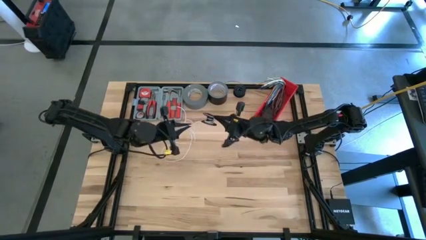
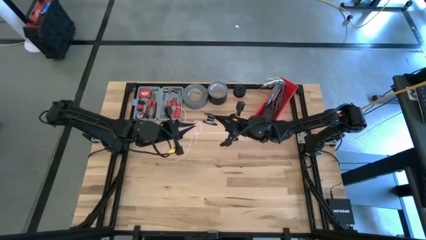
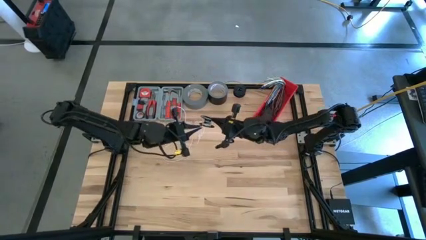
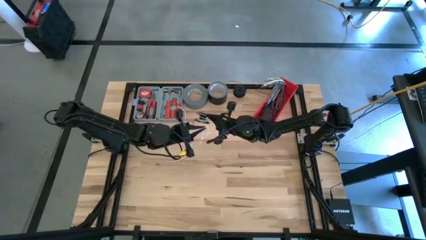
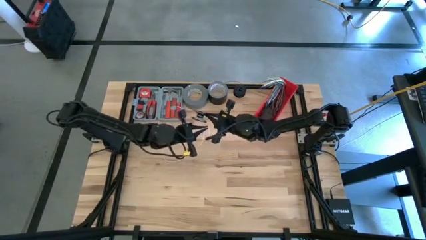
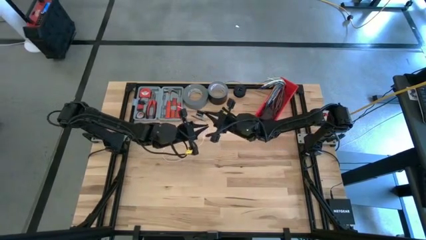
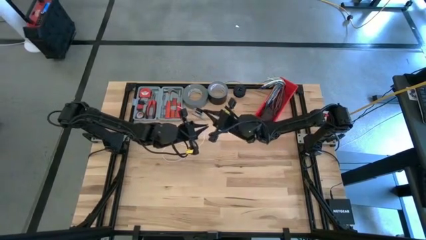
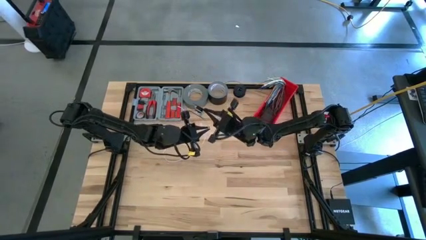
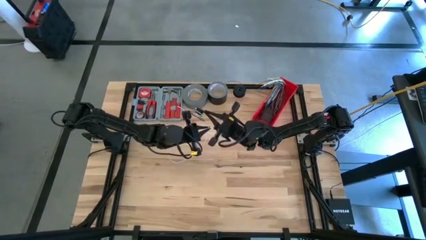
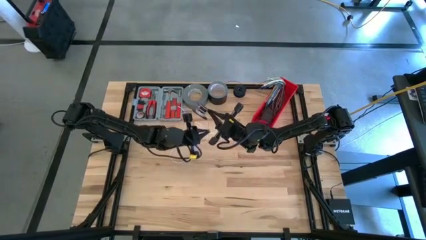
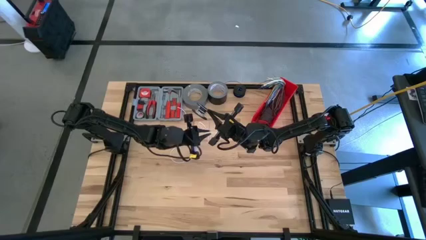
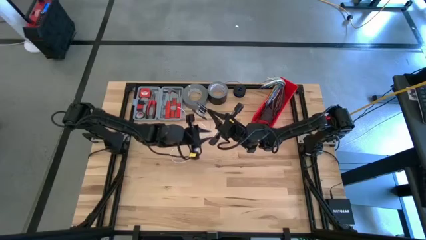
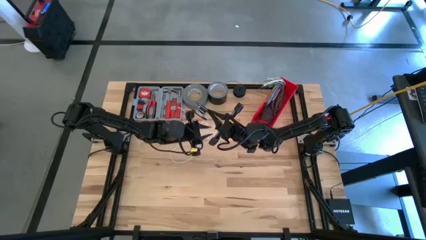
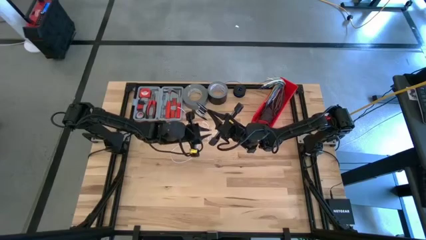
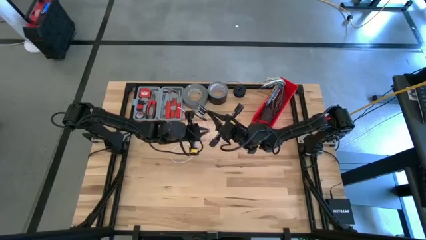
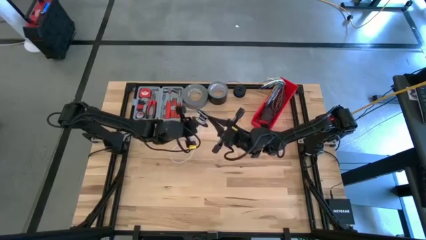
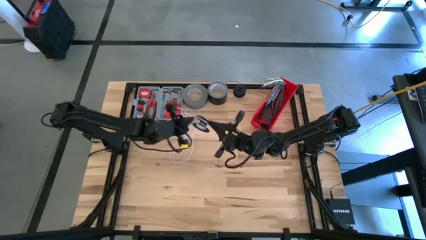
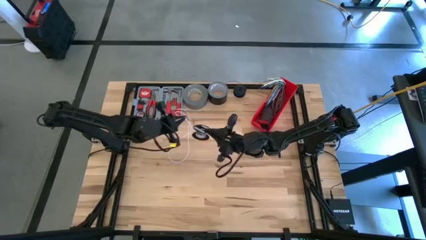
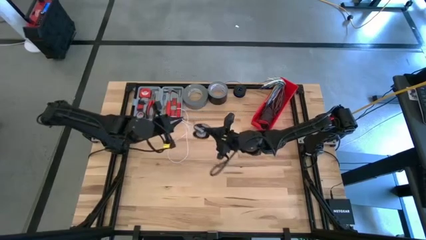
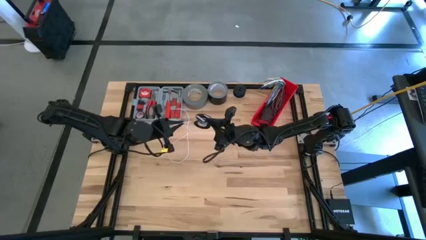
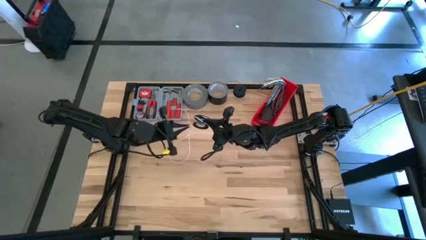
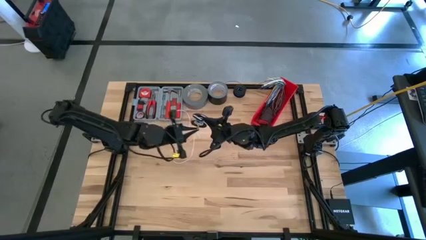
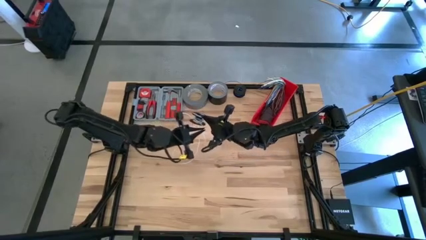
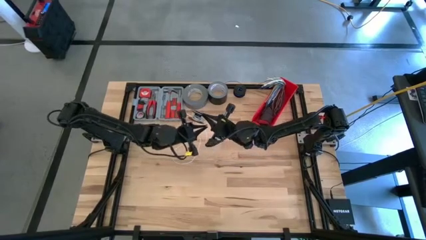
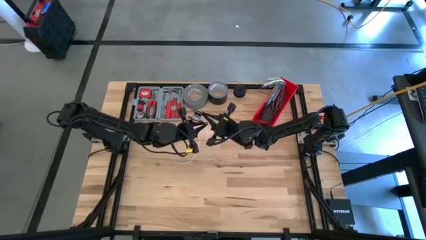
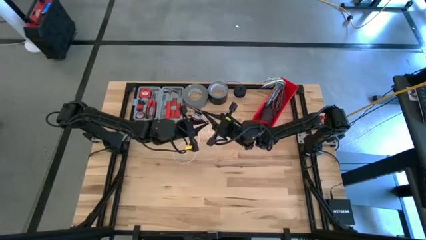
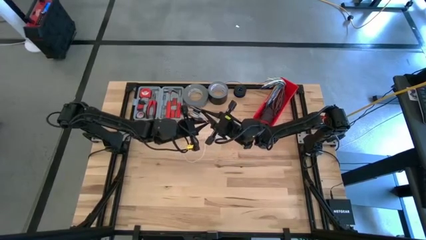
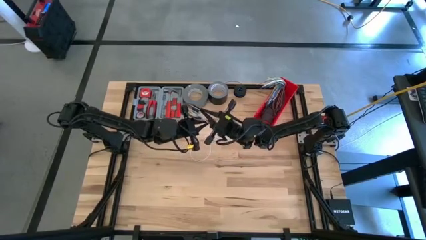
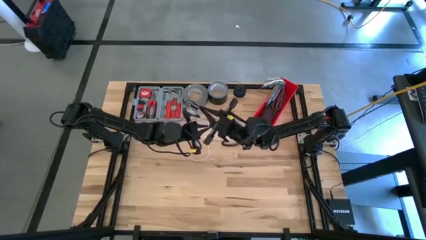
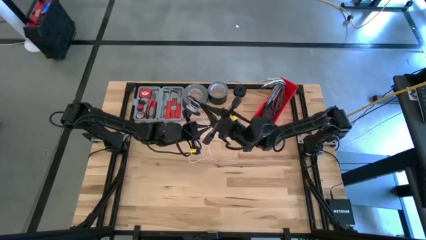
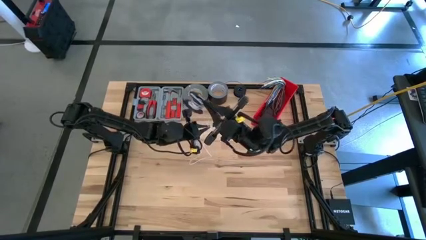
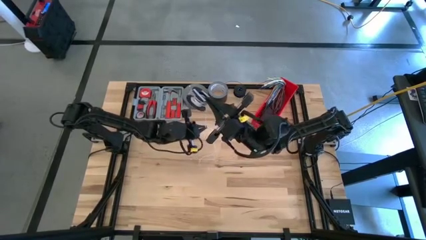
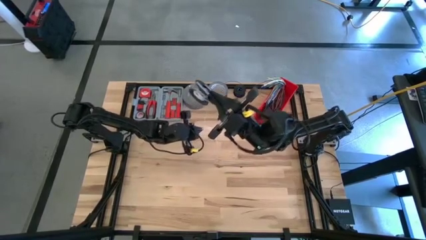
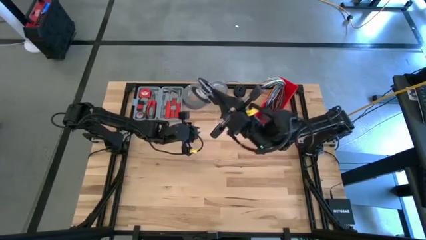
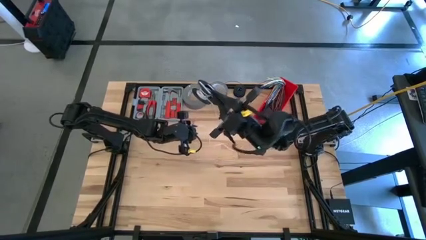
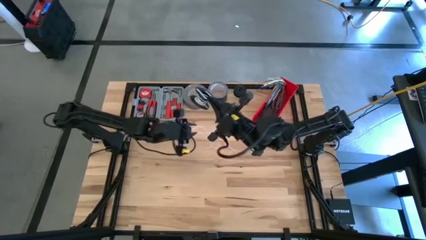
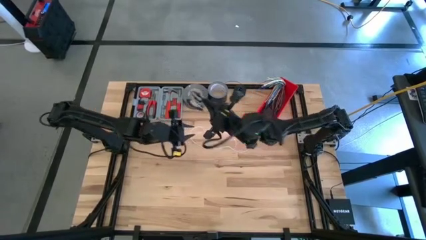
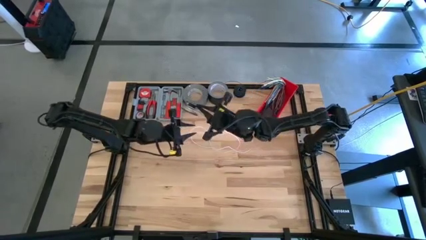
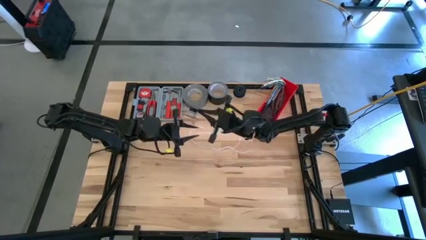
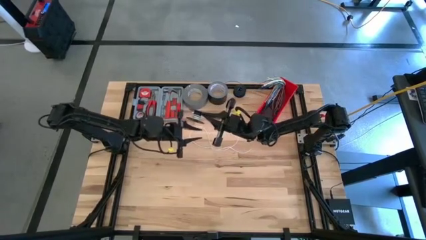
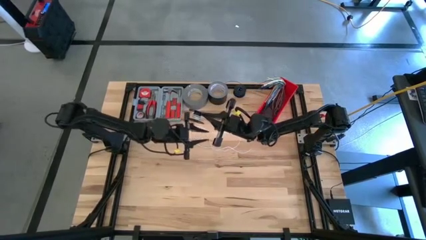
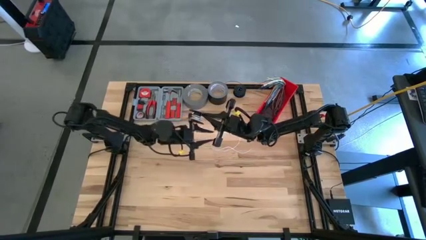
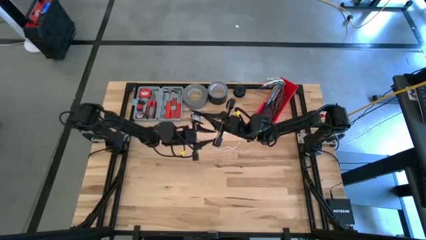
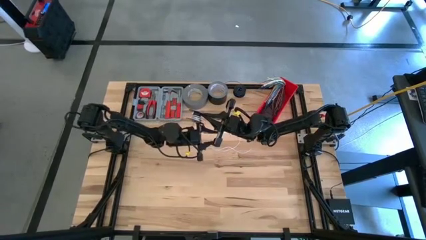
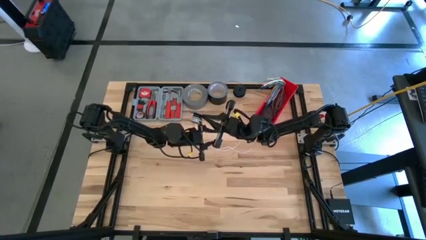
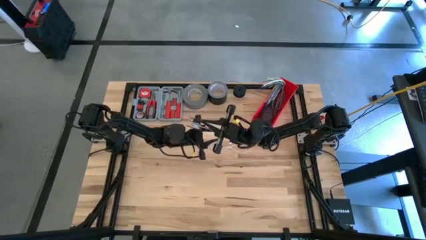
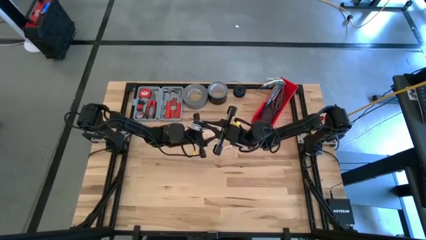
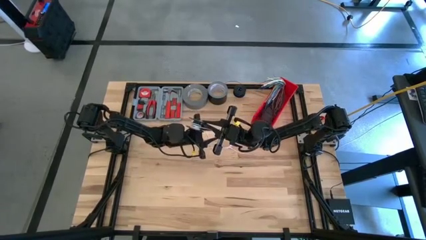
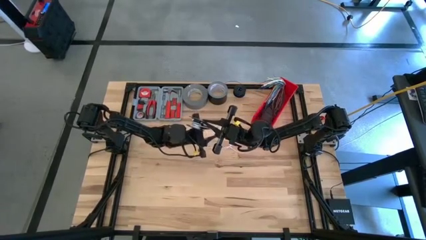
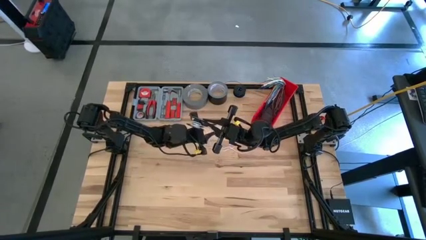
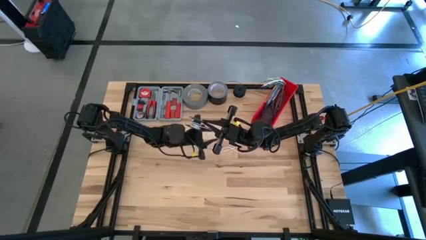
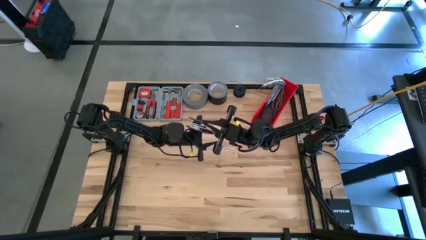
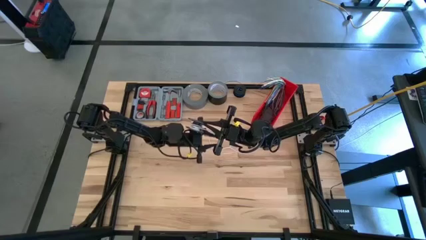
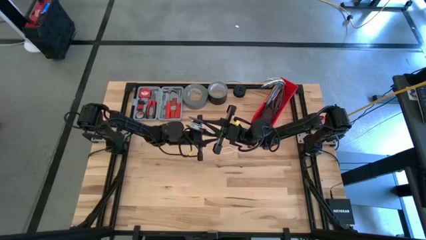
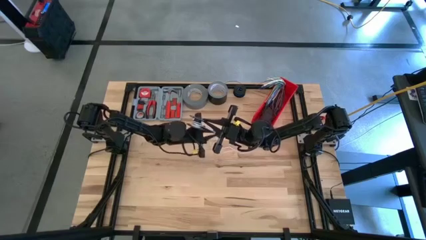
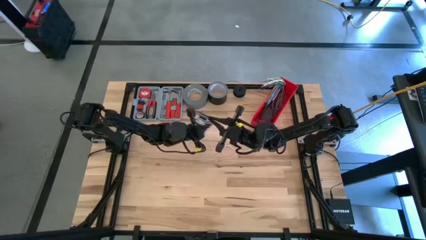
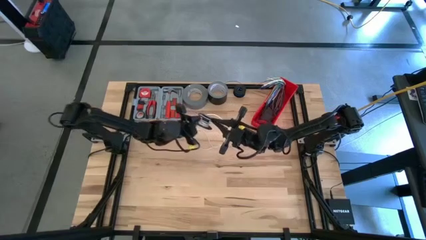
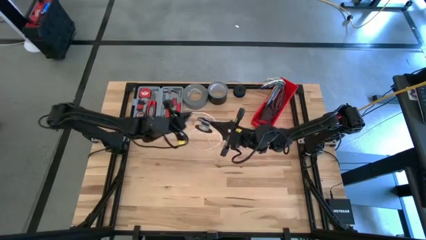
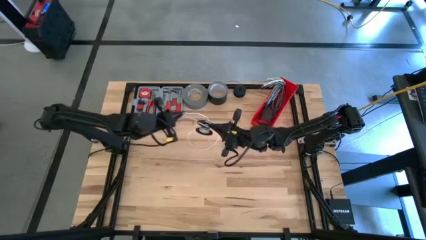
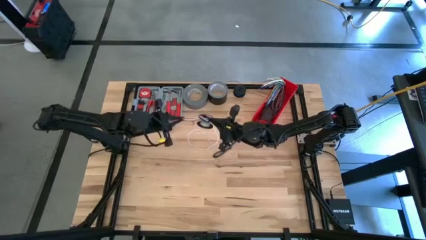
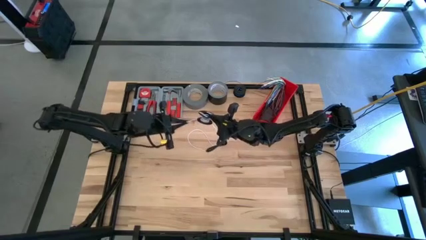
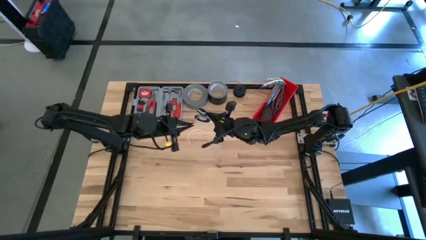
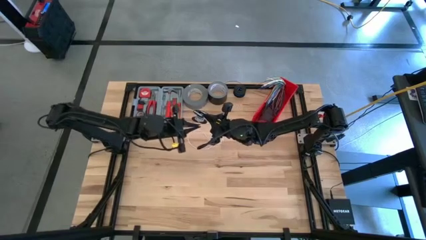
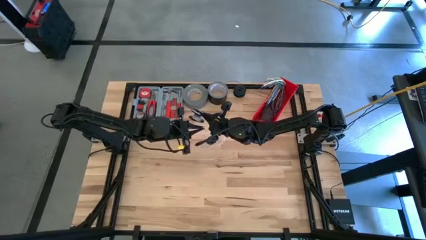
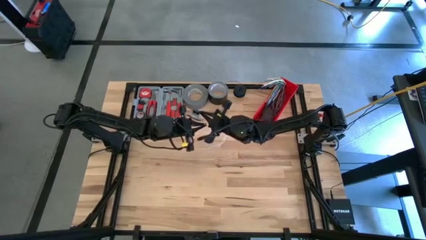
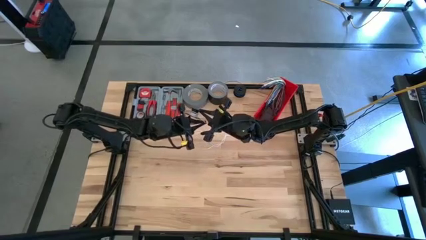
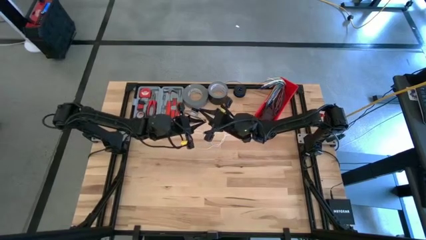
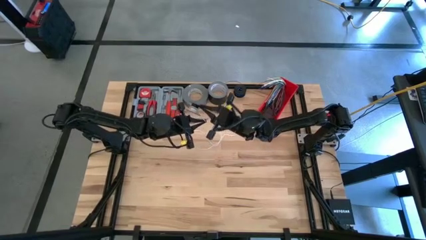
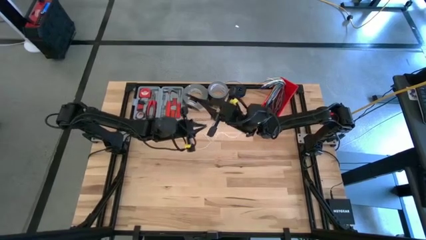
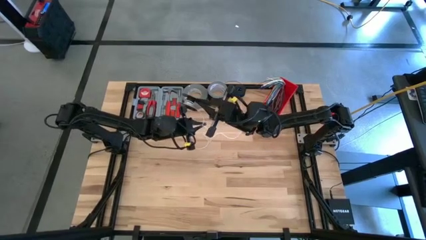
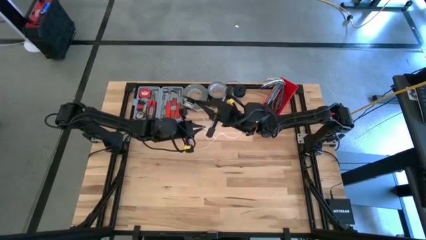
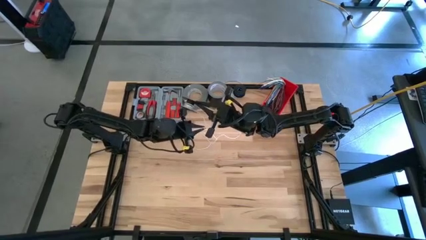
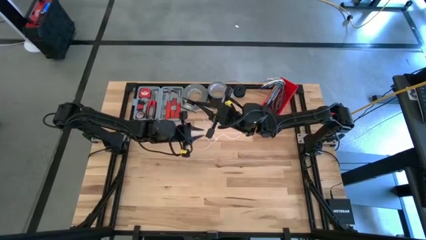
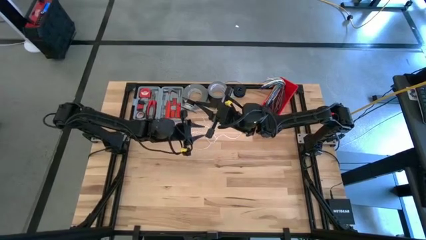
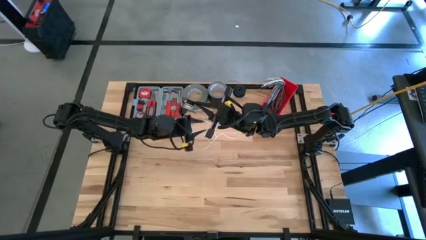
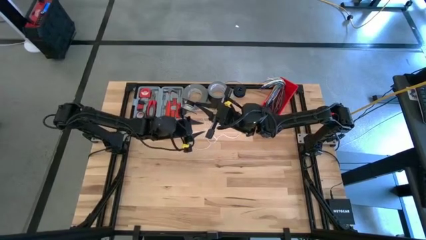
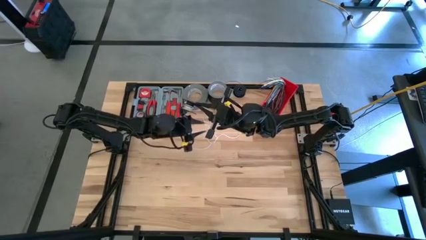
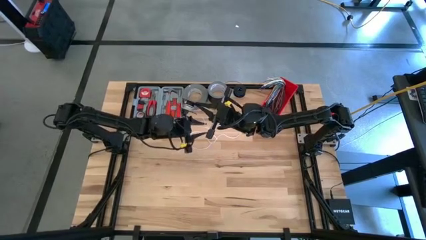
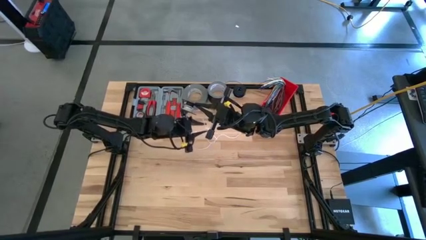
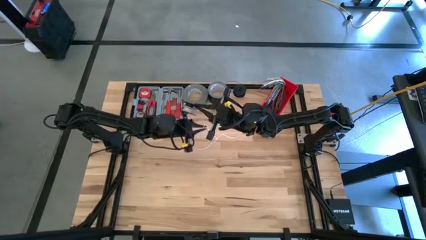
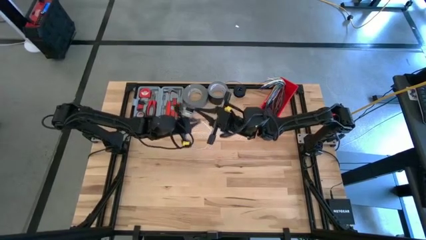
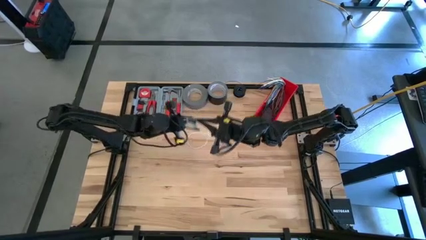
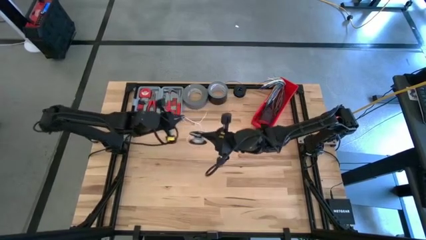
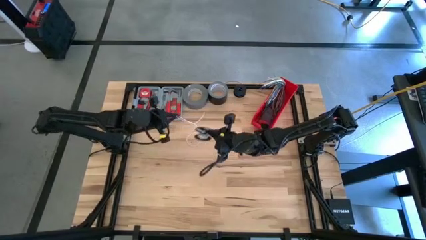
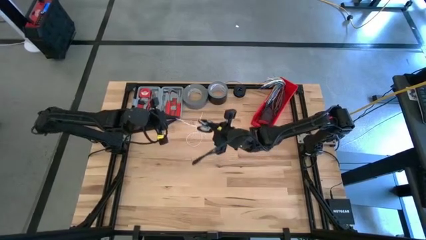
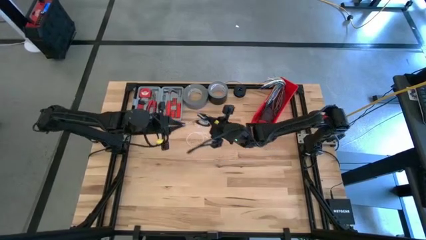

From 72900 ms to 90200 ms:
Task: Coil cords
Coil the white wire onto the black spool
